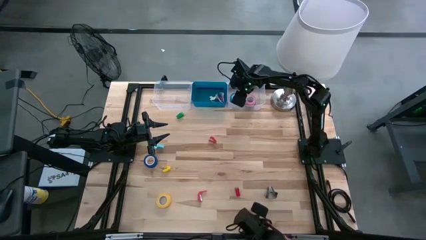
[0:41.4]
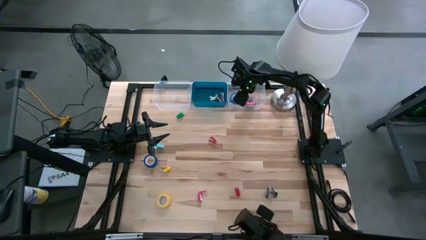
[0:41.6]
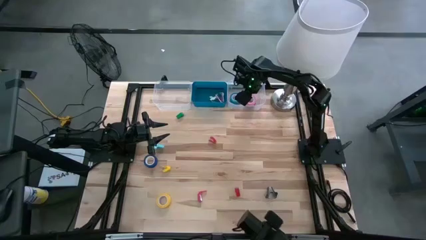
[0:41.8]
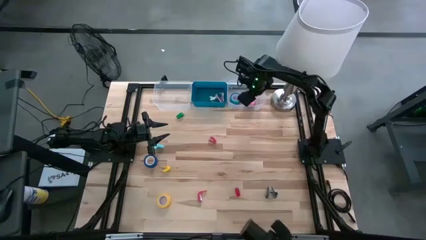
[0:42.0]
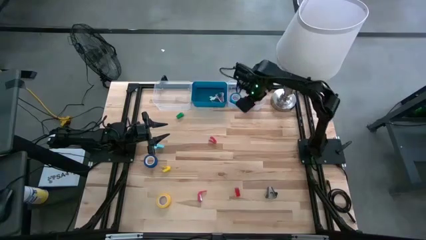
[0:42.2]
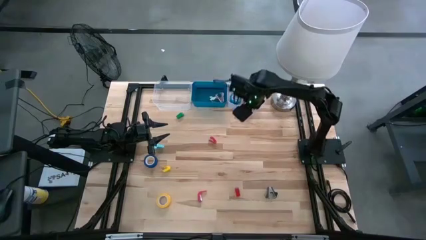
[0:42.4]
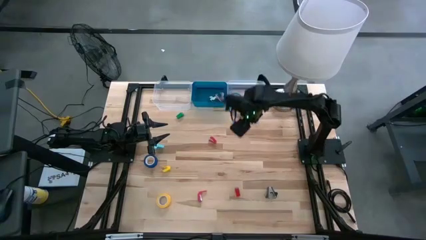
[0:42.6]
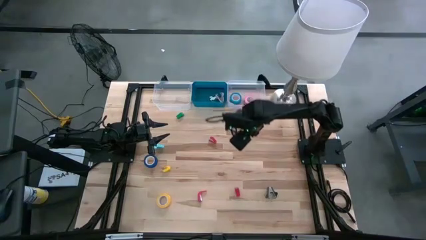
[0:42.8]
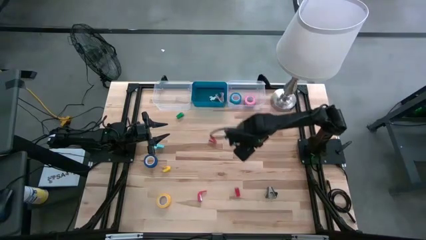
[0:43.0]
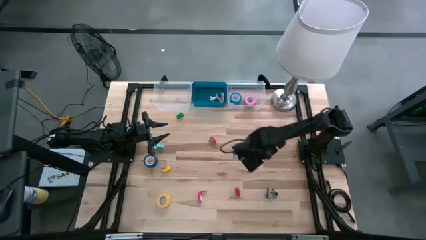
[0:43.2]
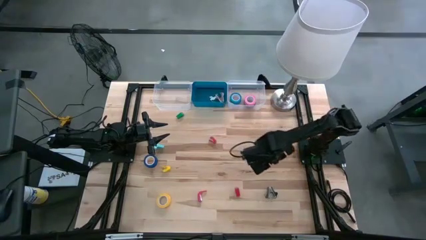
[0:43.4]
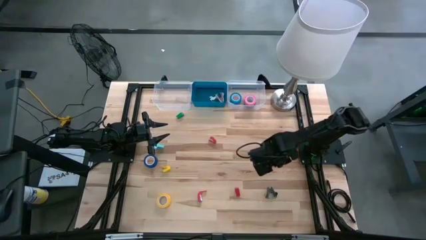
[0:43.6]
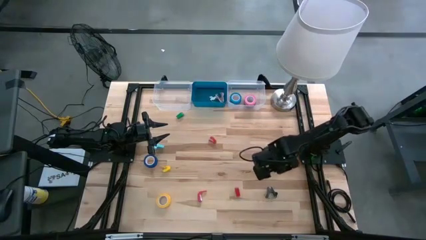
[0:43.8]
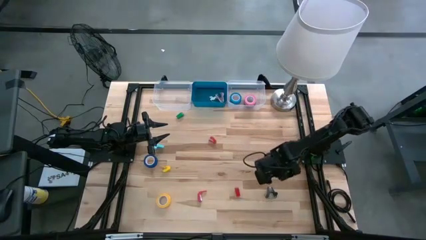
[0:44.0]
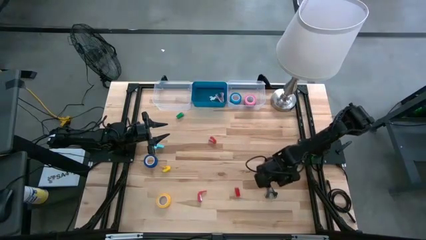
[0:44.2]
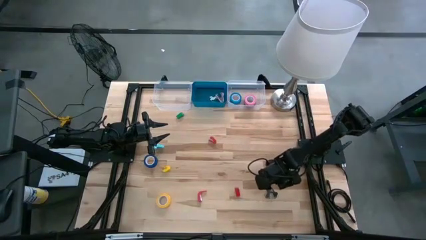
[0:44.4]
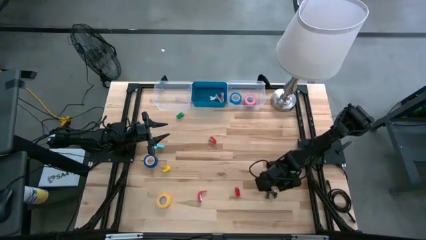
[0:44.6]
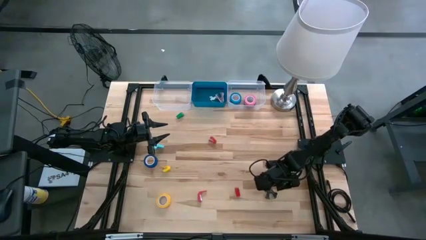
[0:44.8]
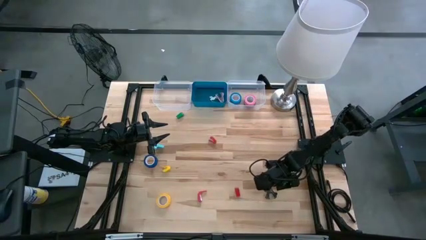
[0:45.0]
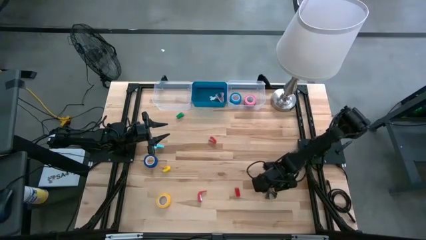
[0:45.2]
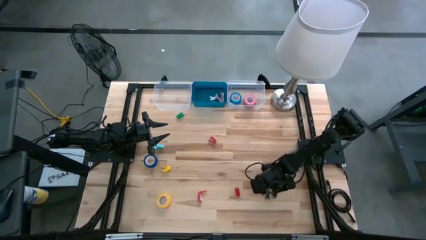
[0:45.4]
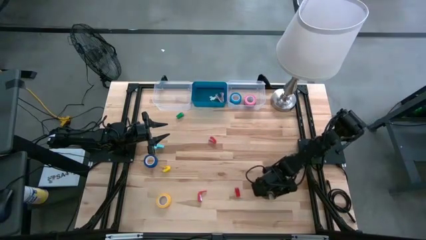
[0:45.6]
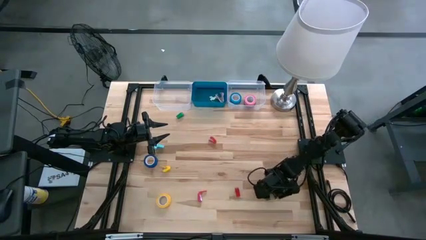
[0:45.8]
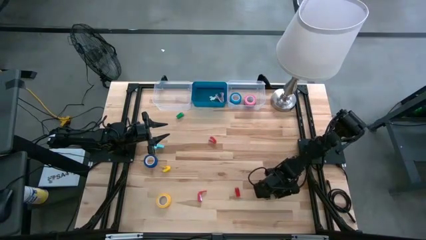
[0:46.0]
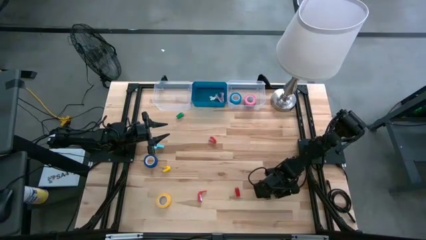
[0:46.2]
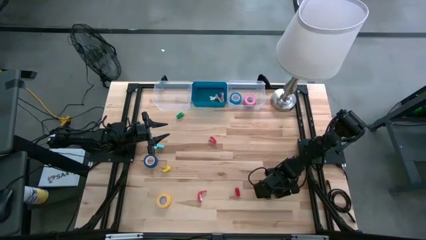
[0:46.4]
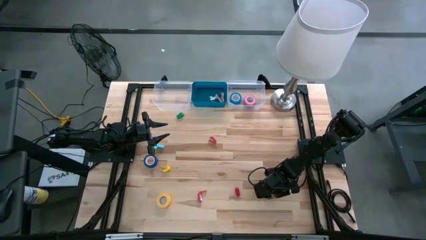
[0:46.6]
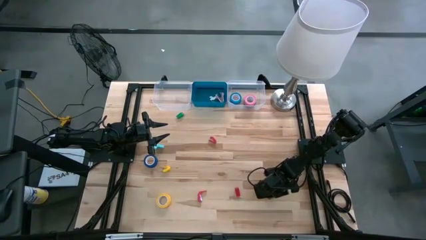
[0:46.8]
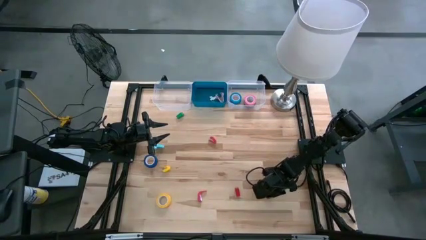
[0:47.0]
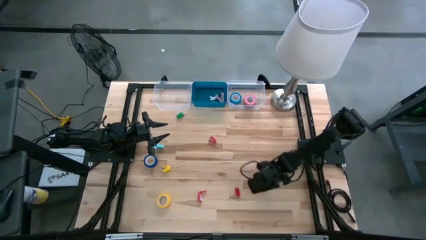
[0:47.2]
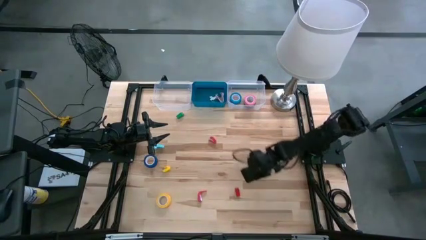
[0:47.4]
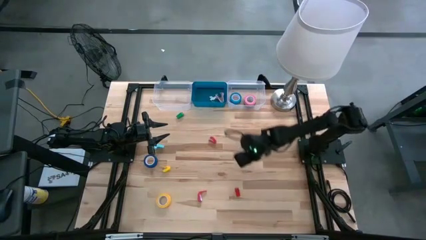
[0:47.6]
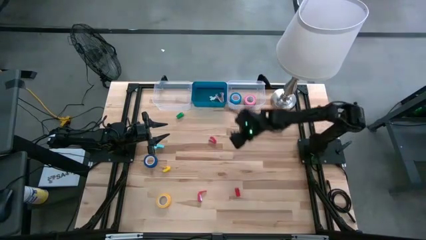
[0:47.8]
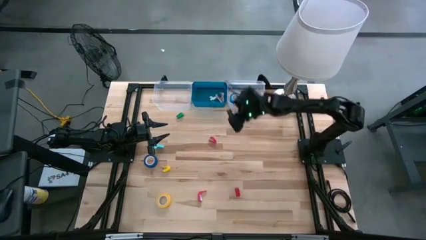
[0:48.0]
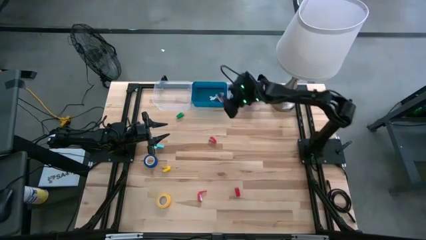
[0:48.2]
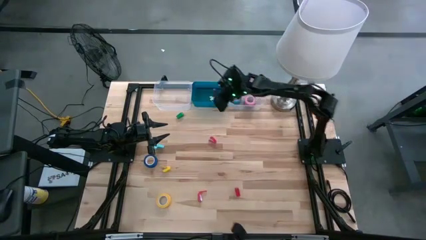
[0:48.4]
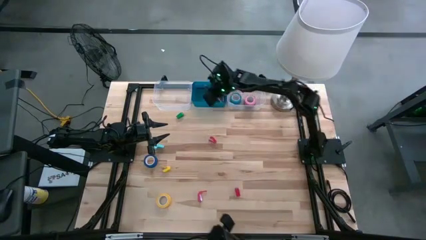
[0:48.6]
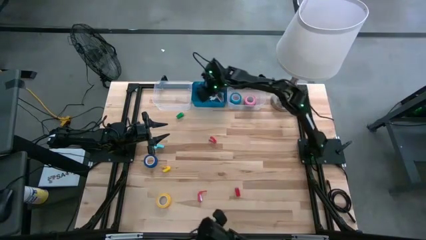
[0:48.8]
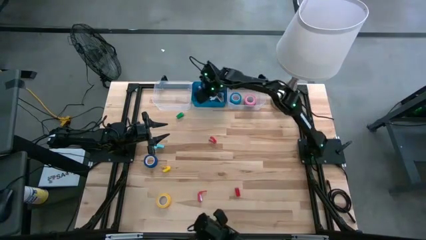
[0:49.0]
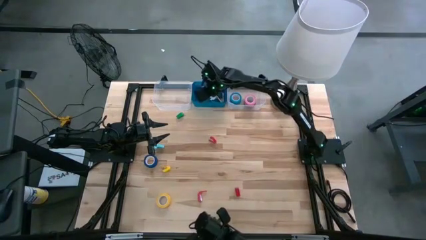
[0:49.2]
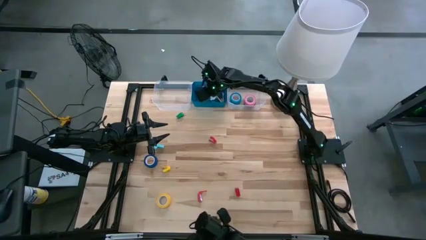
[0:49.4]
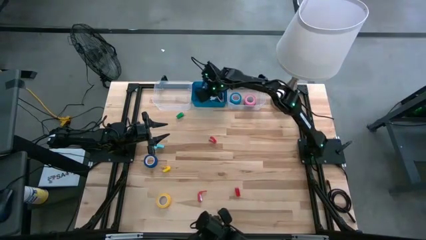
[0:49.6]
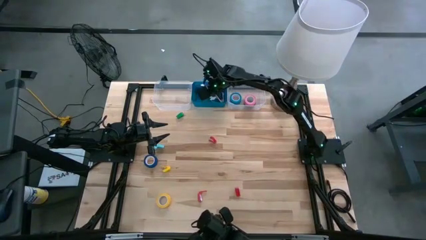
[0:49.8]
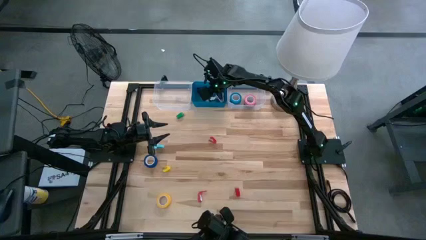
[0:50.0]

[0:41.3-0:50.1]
Task: Pick and place Stapler, Stapler remover, tape
Put the black staple remover into the blue bin

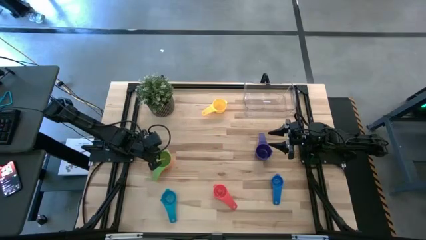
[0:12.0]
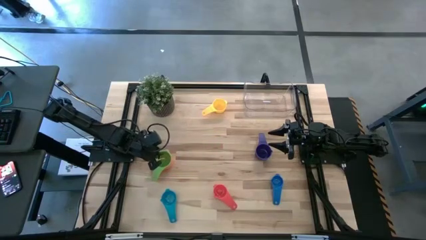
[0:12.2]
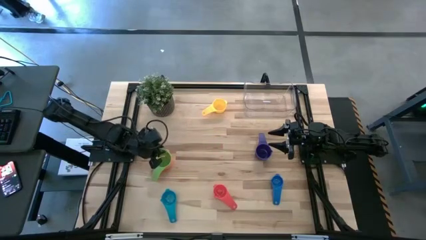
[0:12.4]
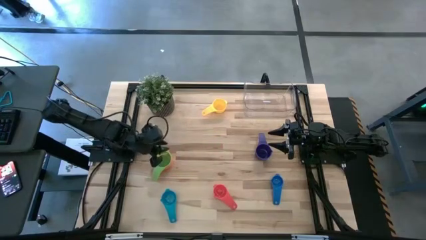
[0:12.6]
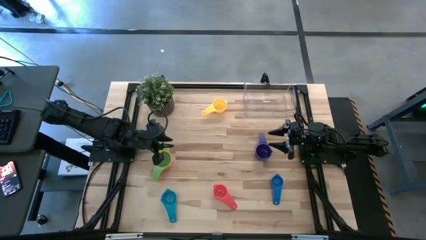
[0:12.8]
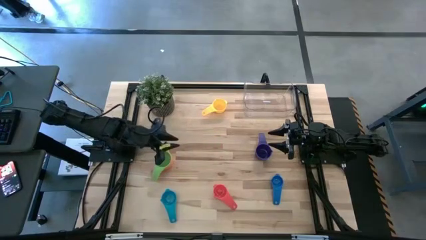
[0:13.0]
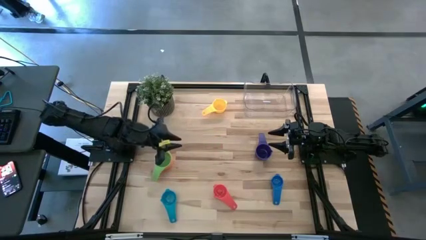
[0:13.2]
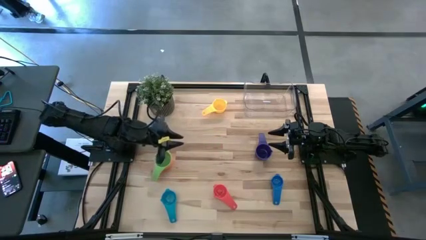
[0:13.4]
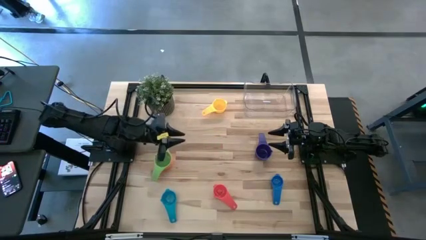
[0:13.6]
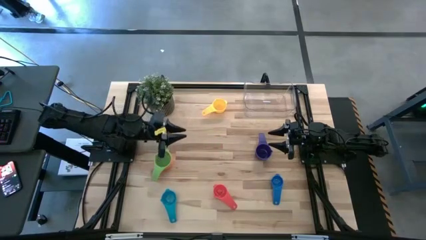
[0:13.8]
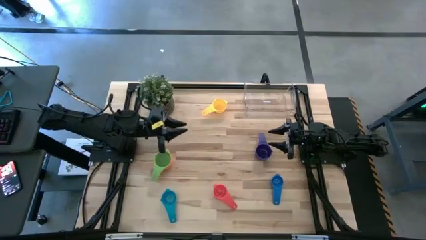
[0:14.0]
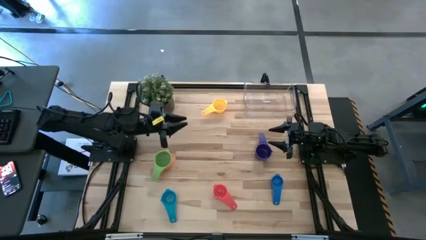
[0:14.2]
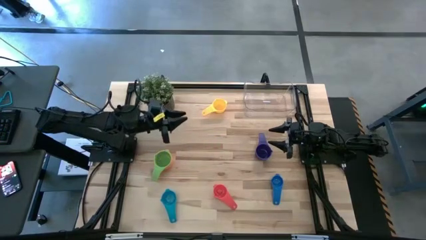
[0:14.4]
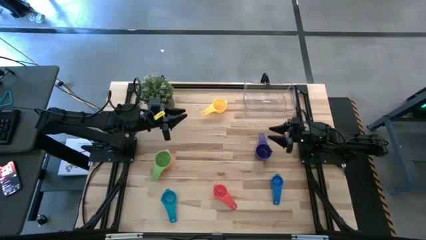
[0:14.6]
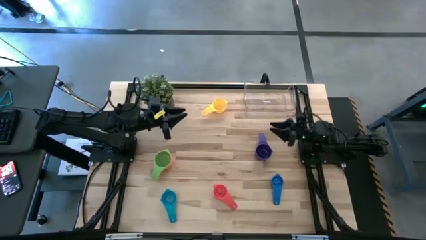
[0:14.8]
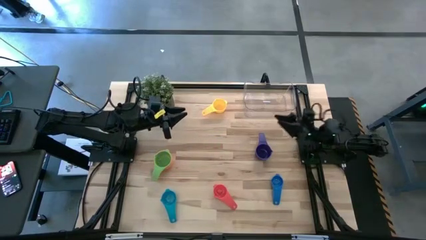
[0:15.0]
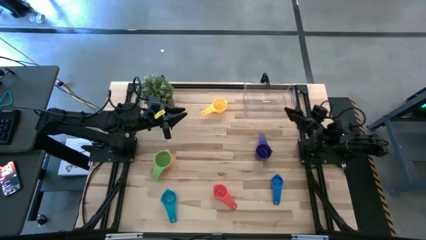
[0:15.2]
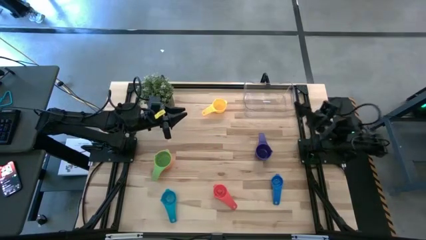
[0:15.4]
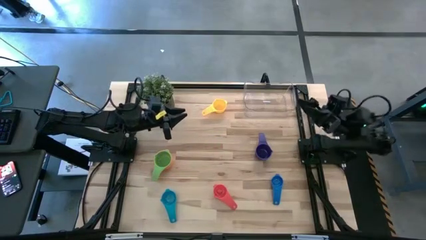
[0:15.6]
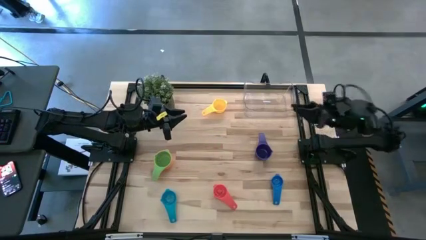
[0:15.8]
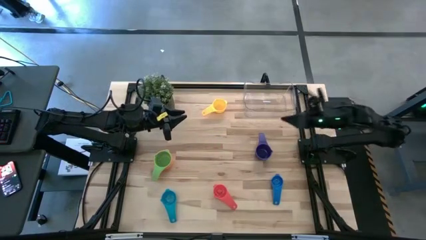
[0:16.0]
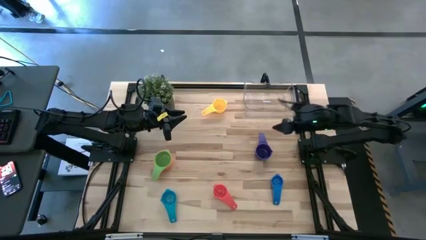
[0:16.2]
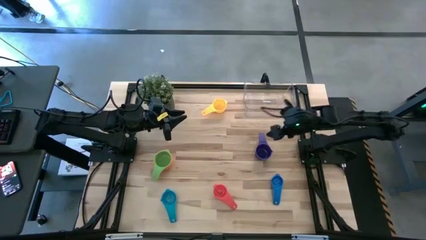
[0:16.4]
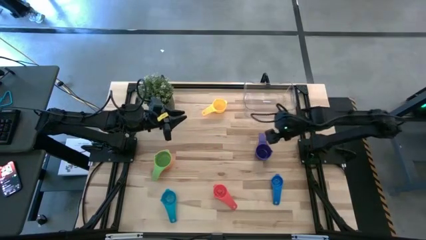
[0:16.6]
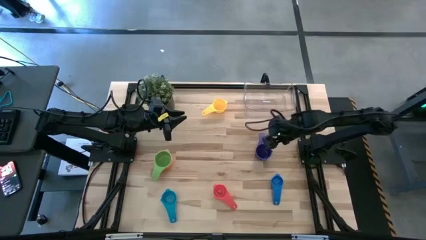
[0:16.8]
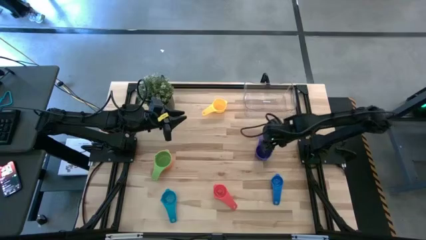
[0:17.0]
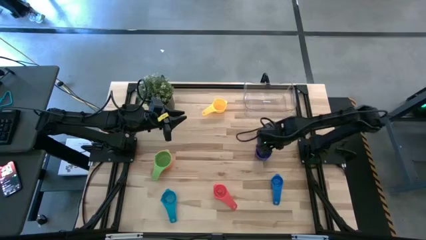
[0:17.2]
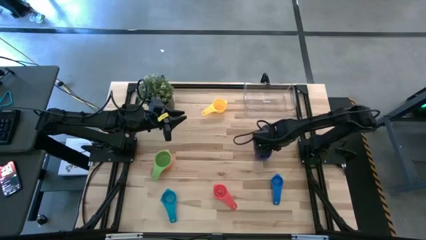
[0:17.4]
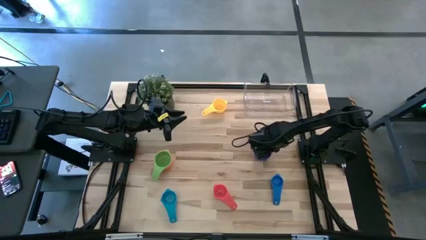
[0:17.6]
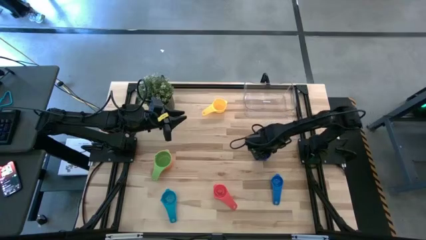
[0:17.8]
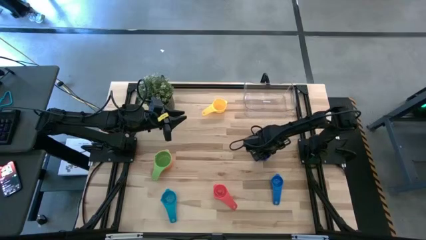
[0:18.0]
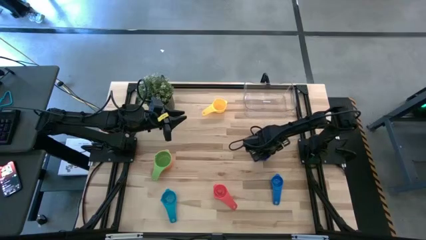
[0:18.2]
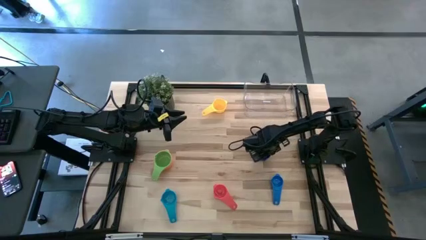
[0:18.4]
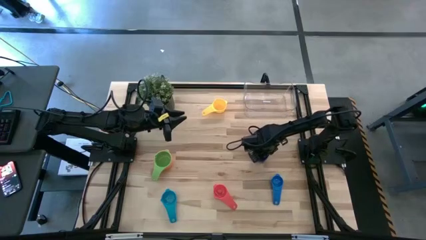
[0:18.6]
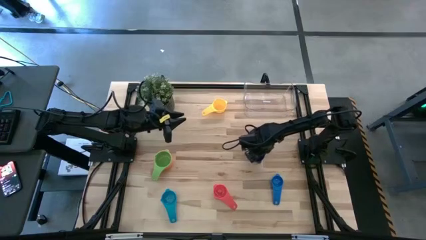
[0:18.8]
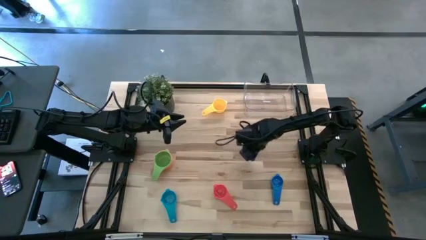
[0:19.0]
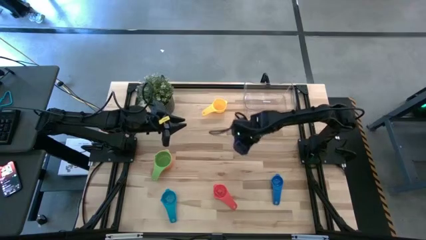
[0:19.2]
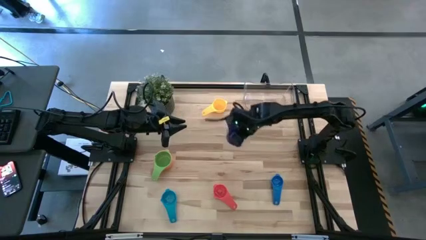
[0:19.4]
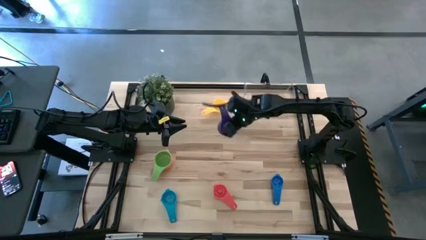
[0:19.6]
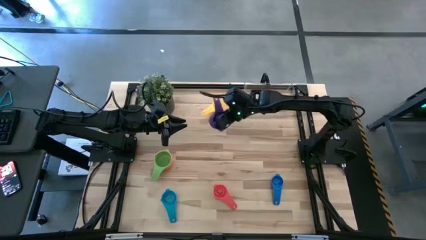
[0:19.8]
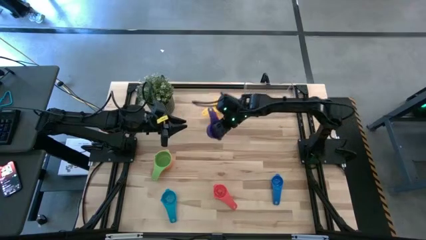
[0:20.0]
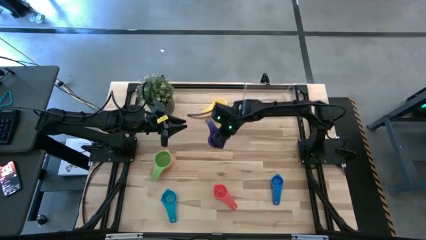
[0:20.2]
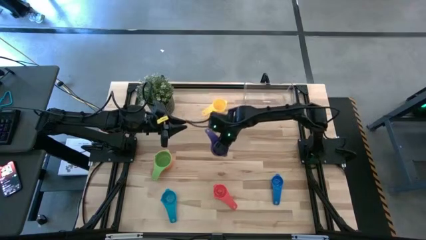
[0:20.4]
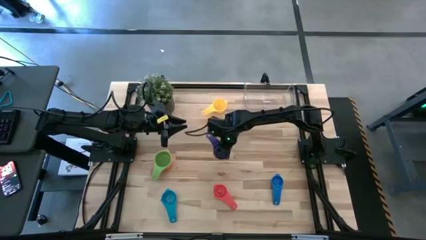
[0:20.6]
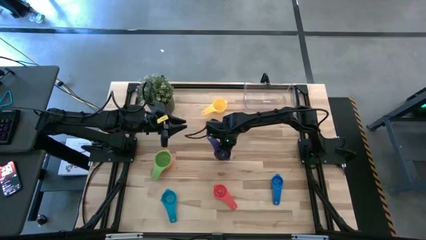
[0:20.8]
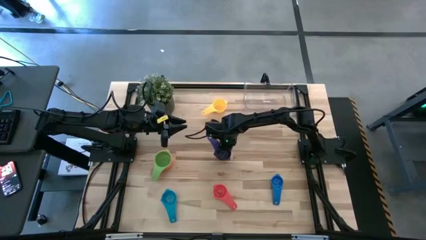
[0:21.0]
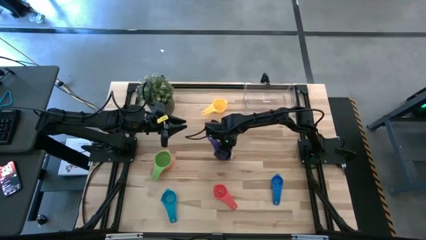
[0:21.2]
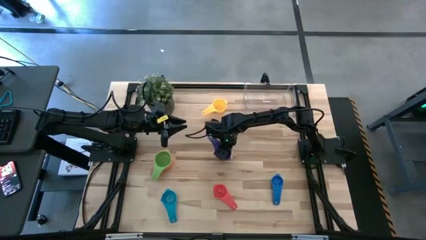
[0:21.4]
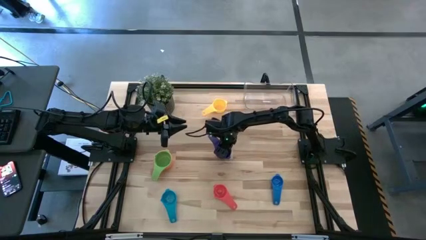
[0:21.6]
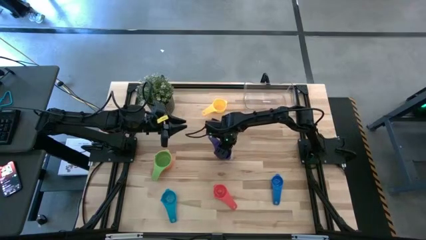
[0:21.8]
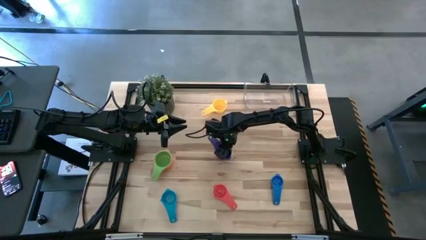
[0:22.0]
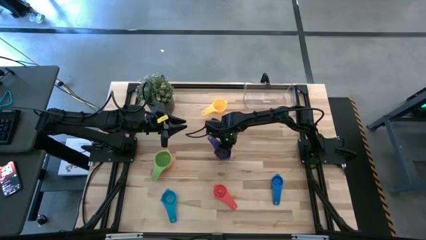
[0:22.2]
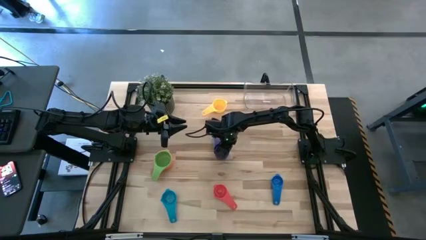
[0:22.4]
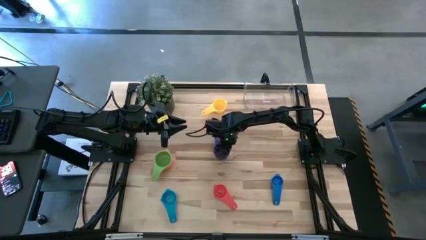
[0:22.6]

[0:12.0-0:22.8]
Task: Nest measuring cups in basket
Stack the violet measuring cup on top of the green measuring cup
